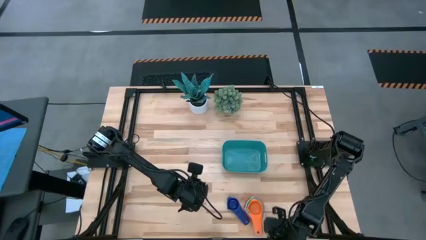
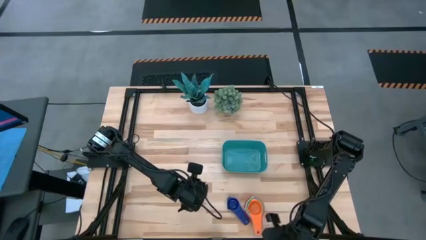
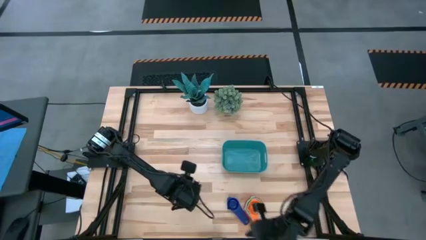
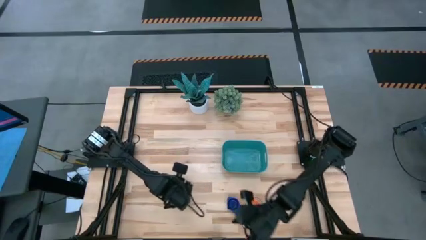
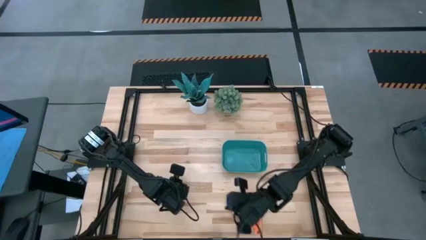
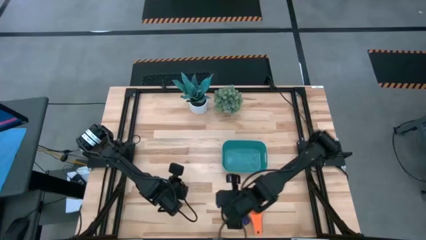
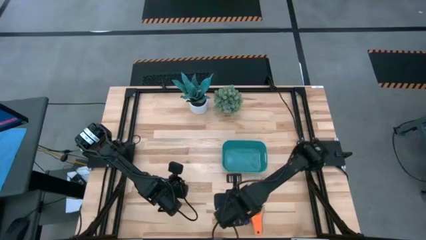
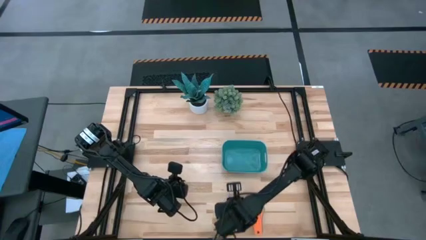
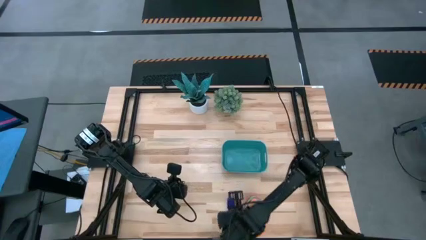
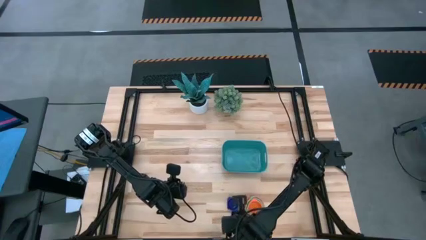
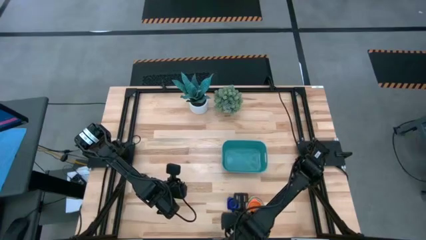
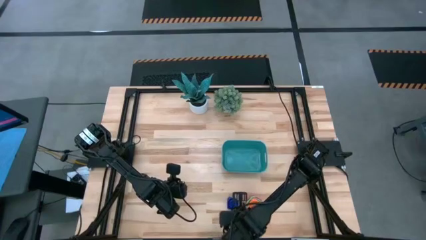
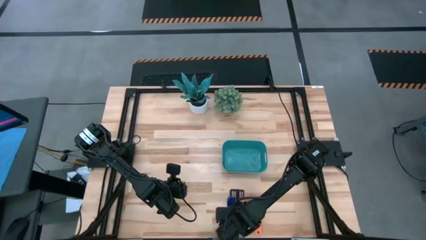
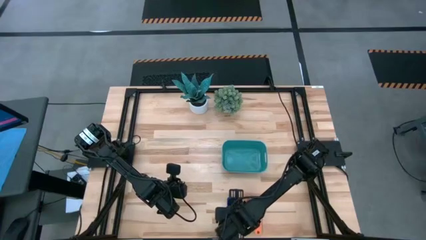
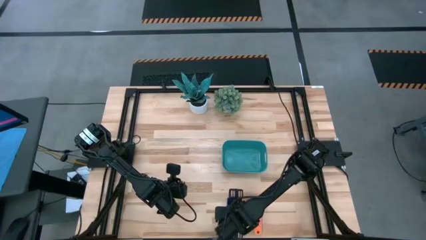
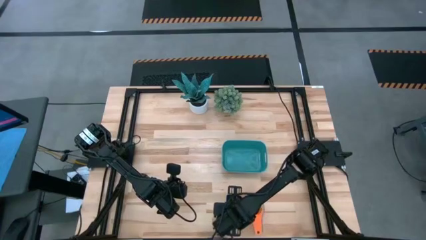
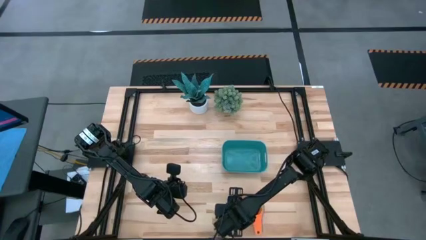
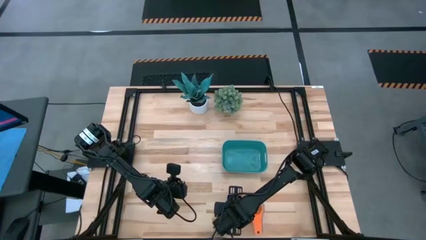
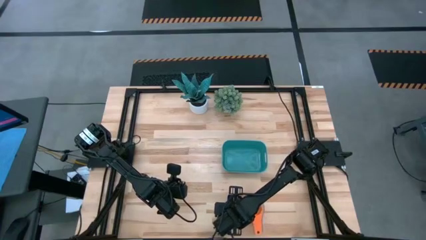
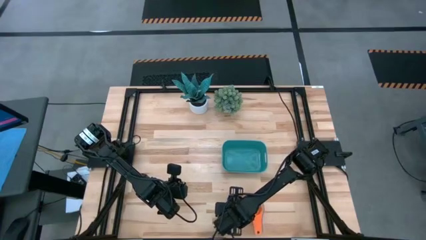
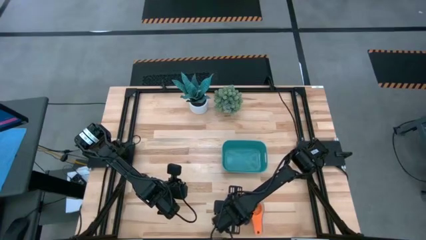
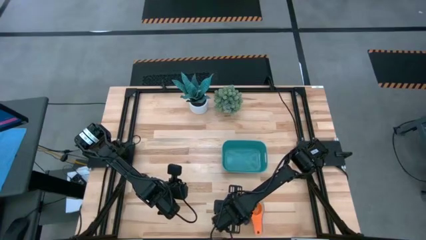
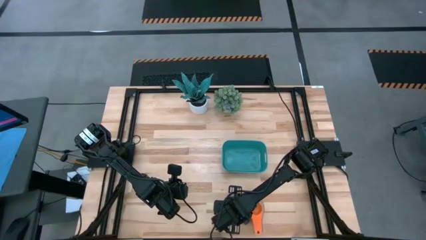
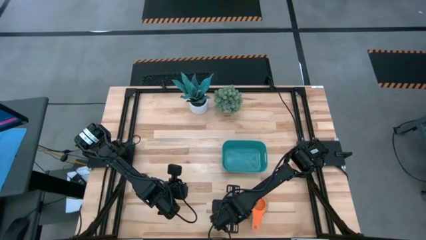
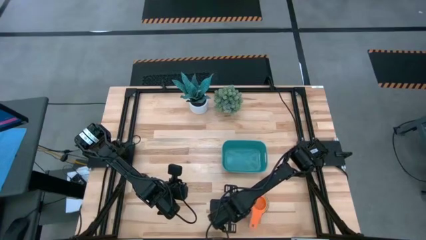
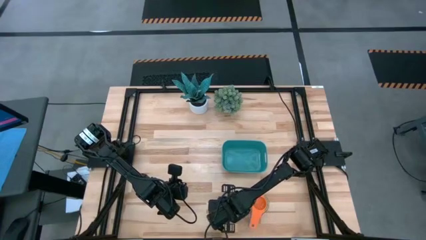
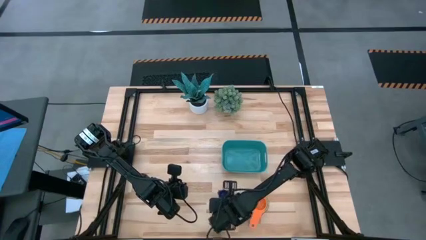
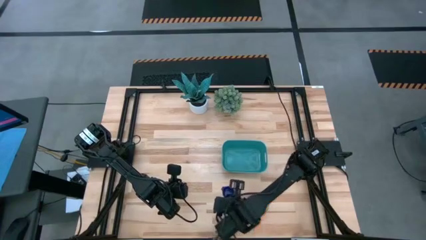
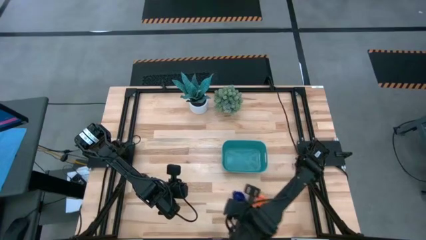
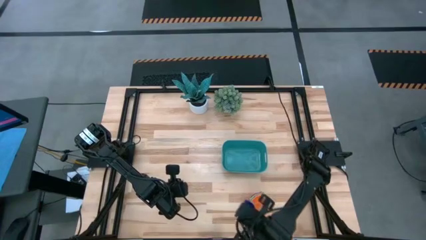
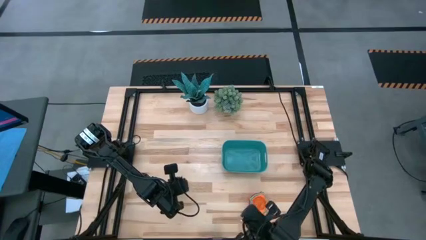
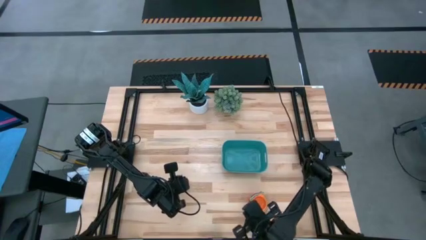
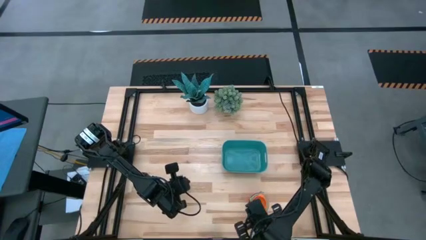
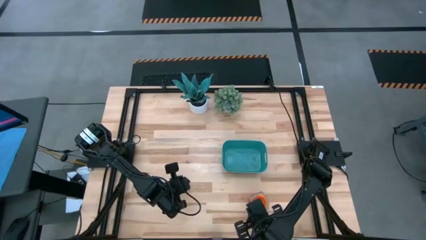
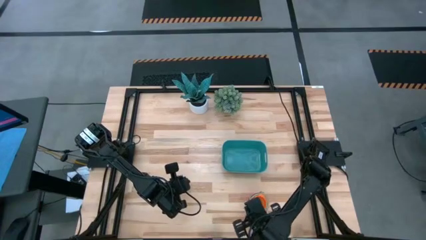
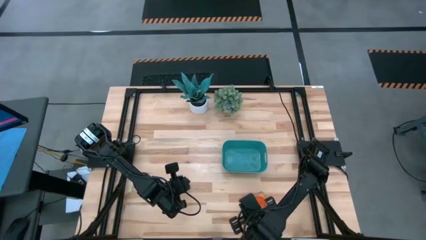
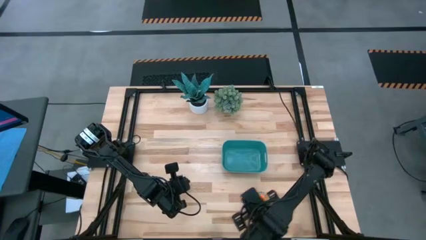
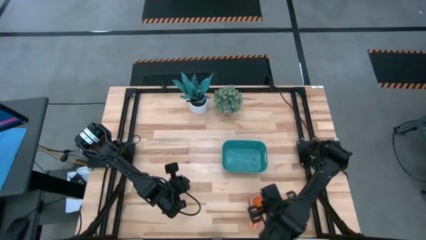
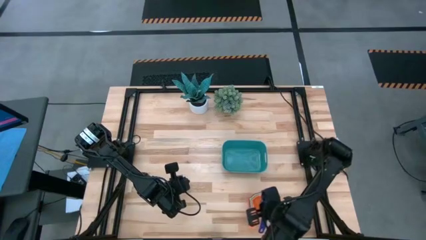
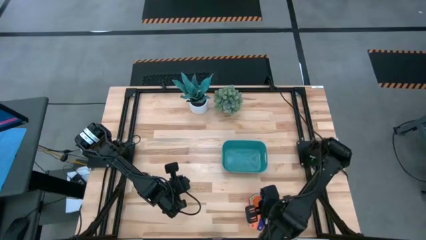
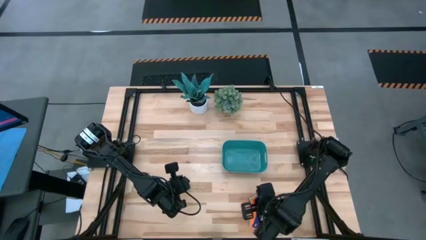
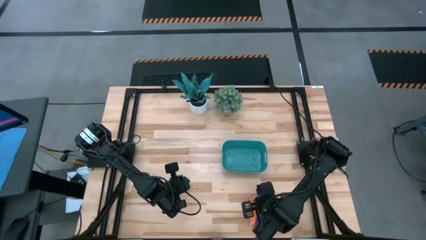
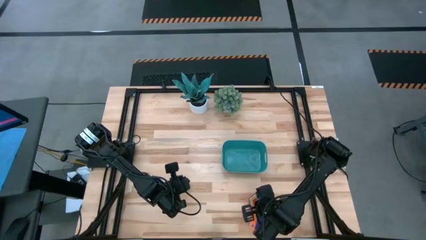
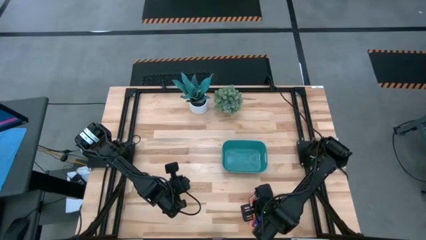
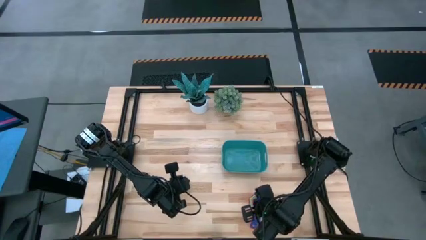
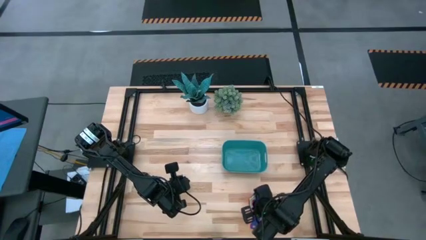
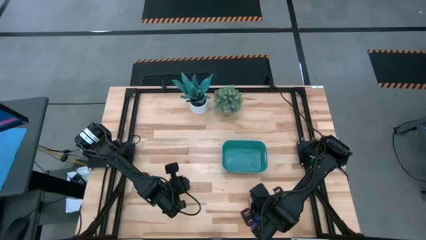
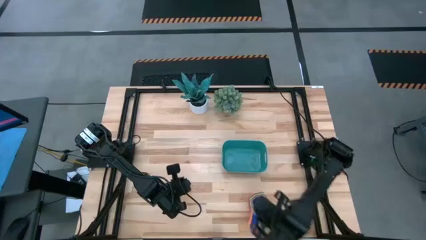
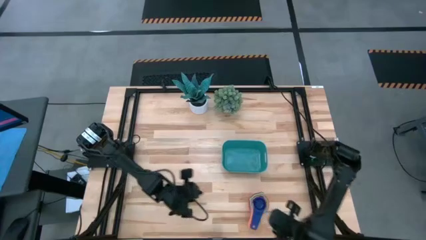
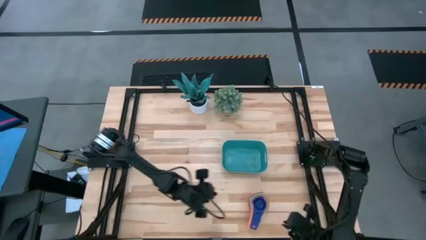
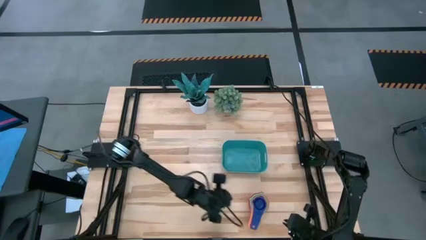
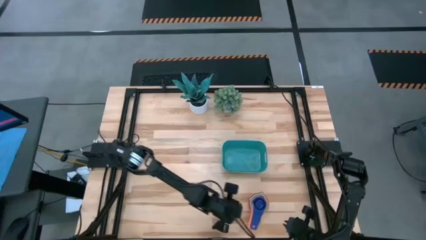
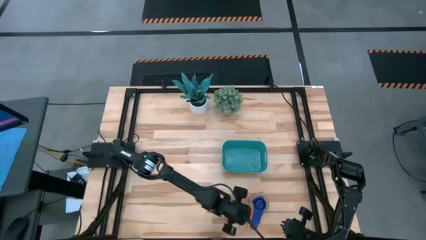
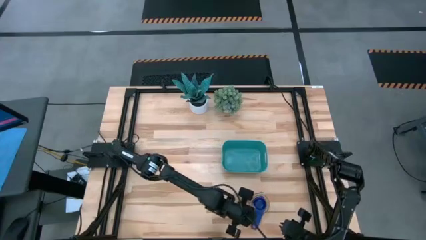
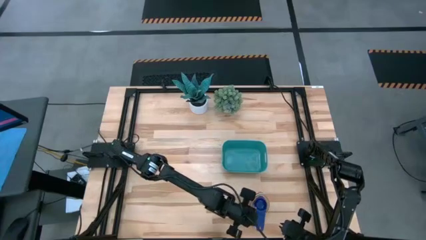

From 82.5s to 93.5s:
Task: Nest measuring cups in basket
Stack the violet measuring cup on top of the orange measuring cup

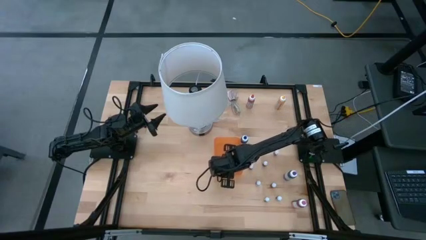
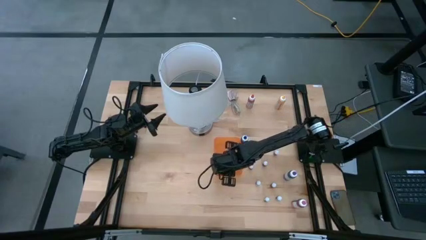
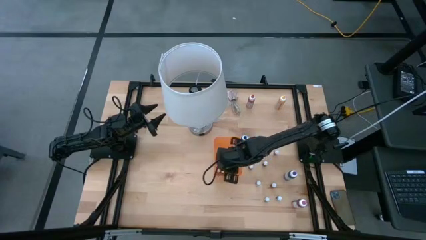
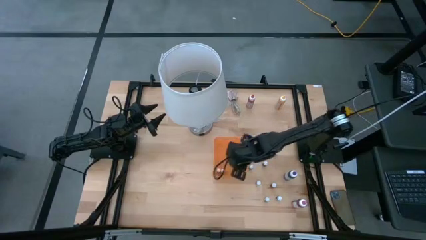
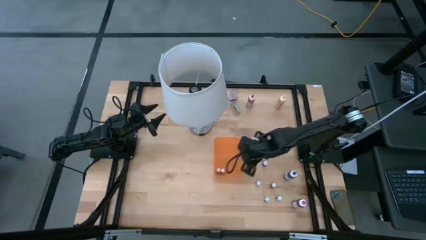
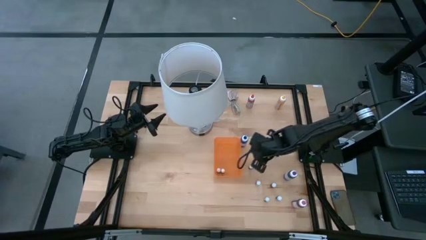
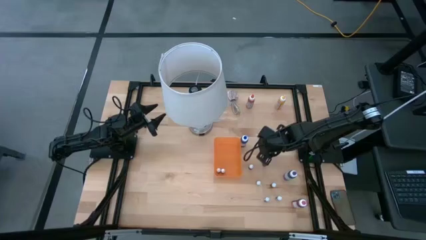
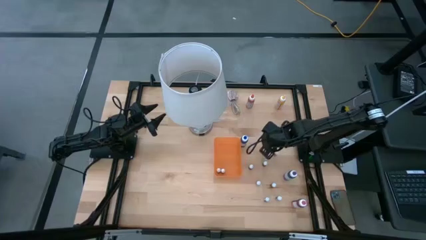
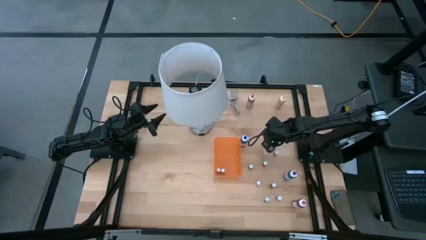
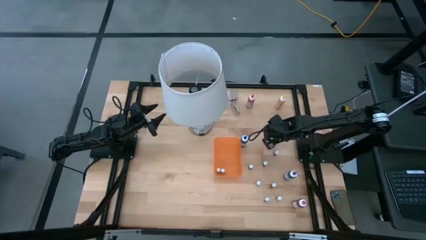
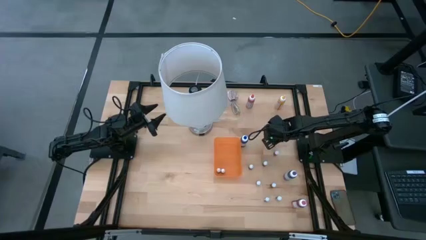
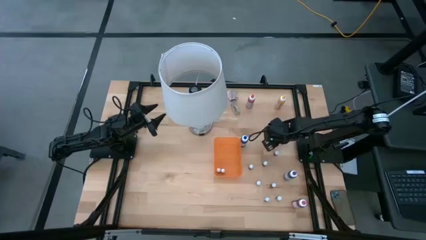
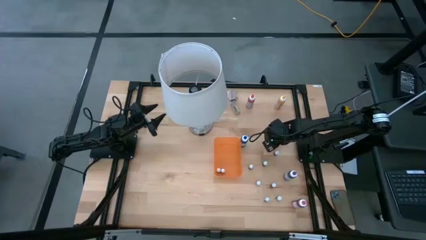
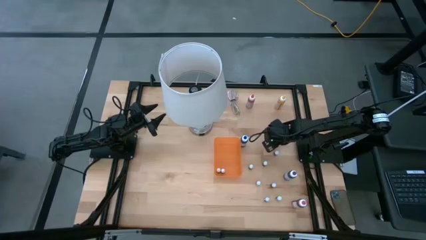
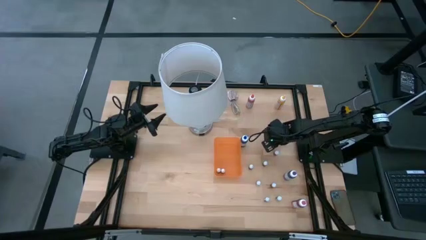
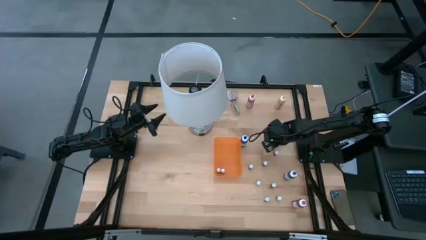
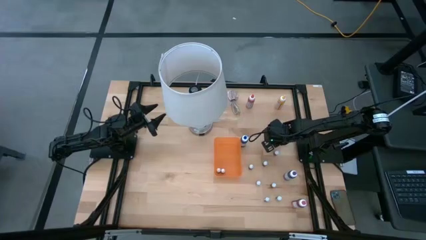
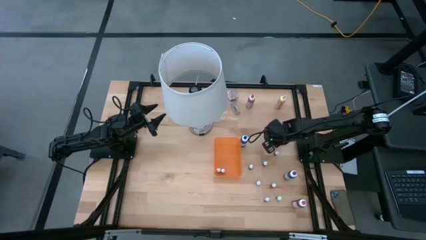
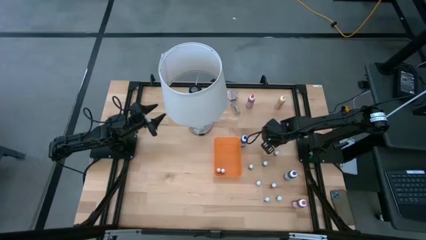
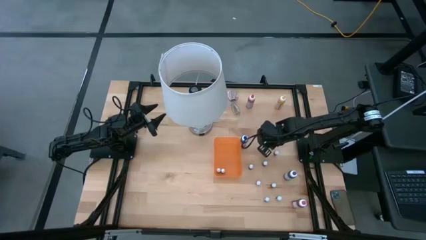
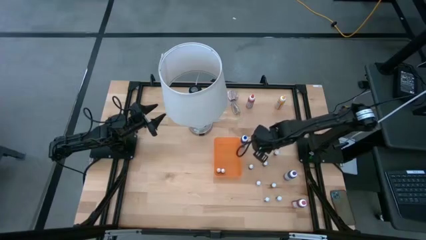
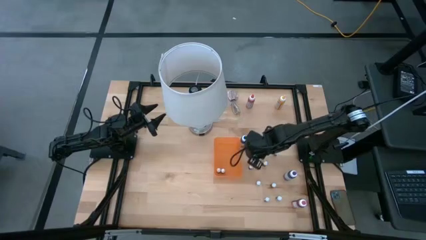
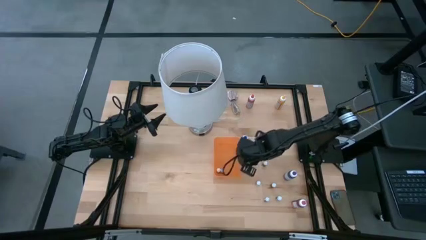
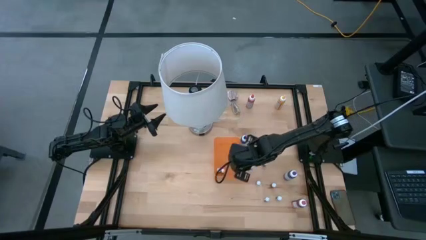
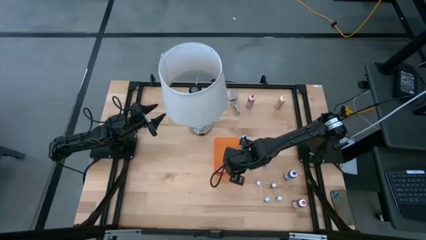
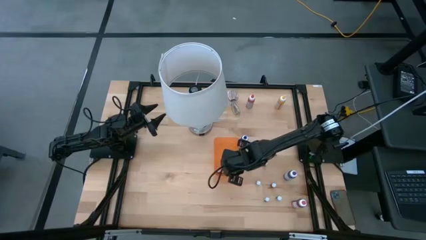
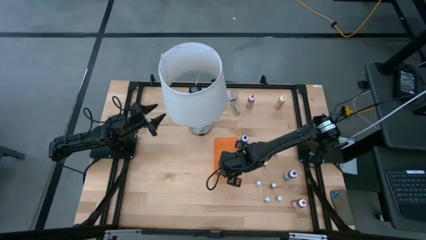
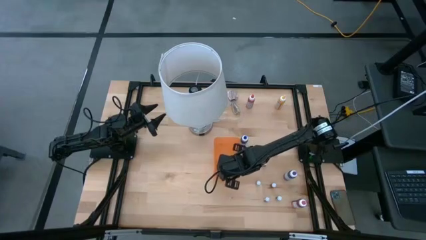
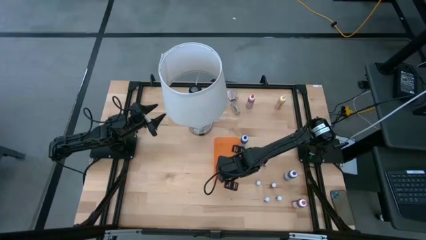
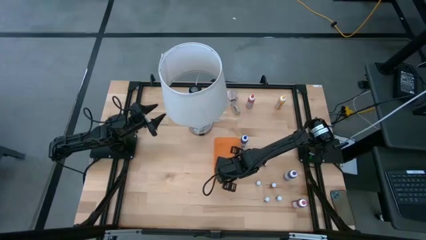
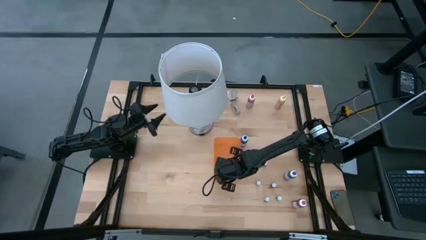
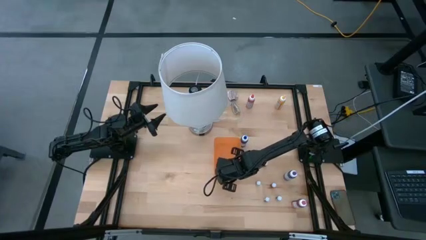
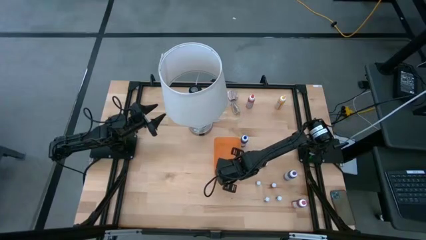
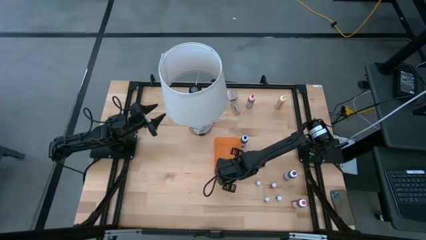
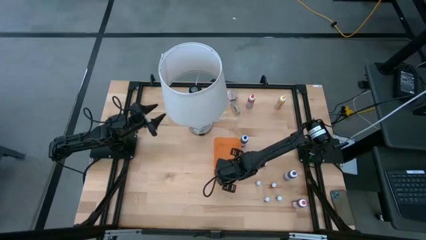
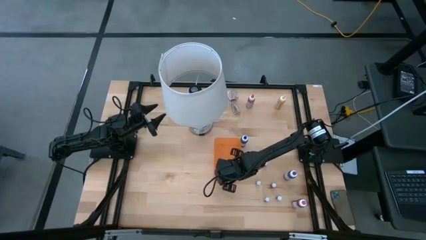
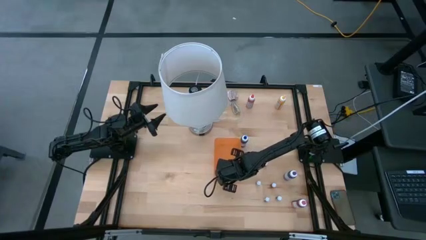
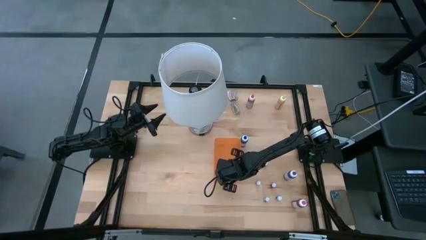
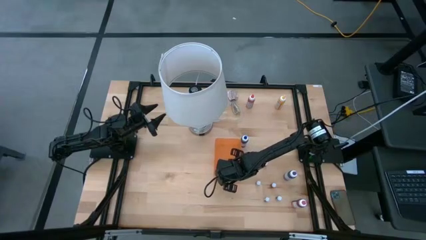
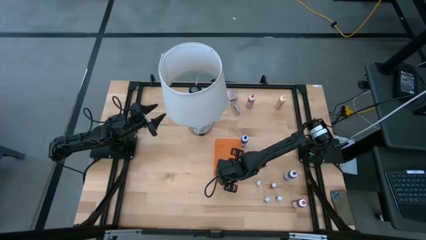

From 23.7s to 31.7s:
Task: Pick & Place food coloring
Put the small green food coloring bottle into the orange bin
